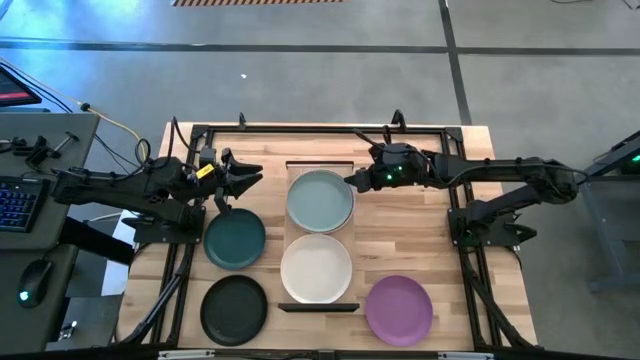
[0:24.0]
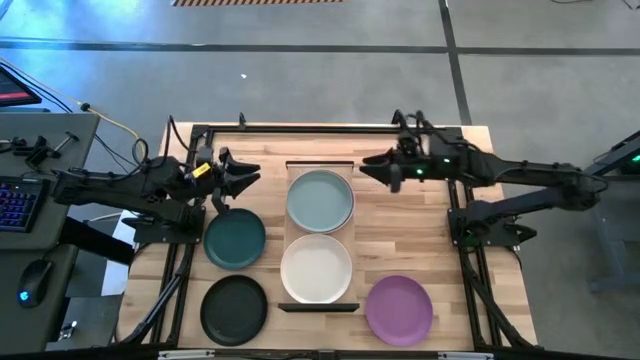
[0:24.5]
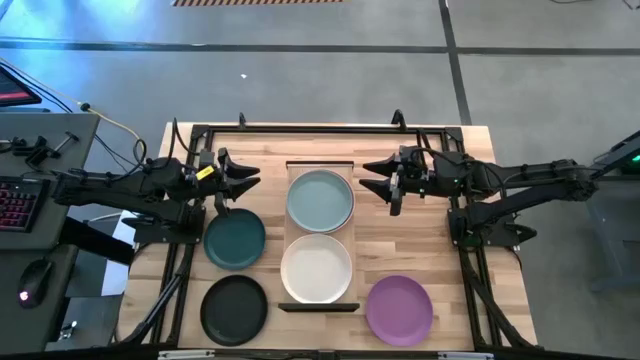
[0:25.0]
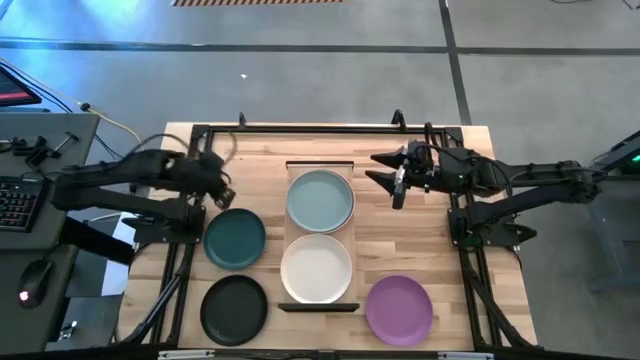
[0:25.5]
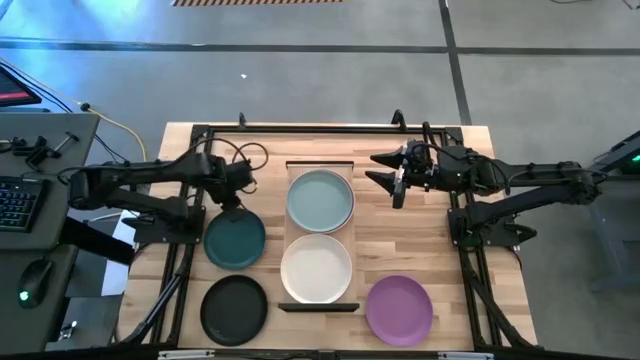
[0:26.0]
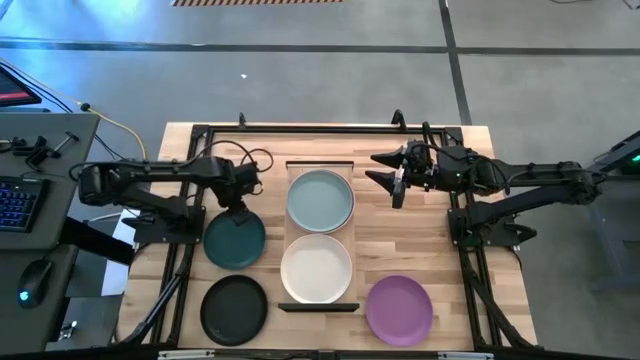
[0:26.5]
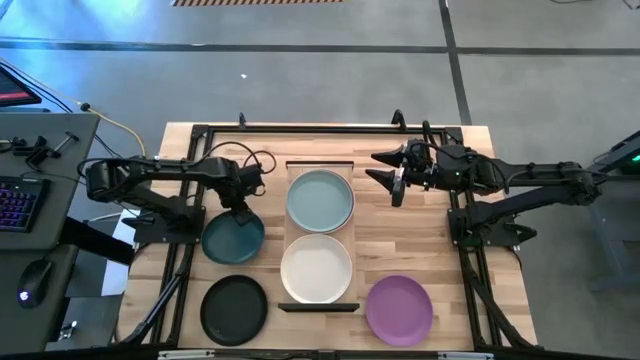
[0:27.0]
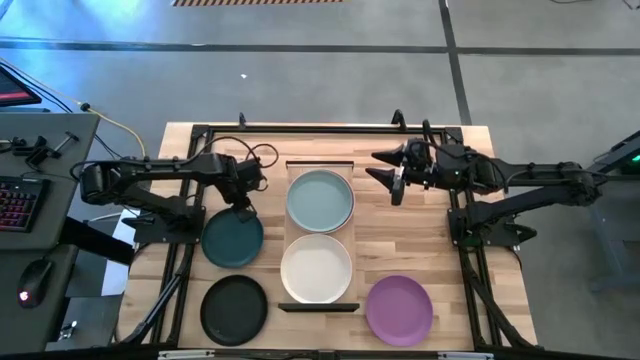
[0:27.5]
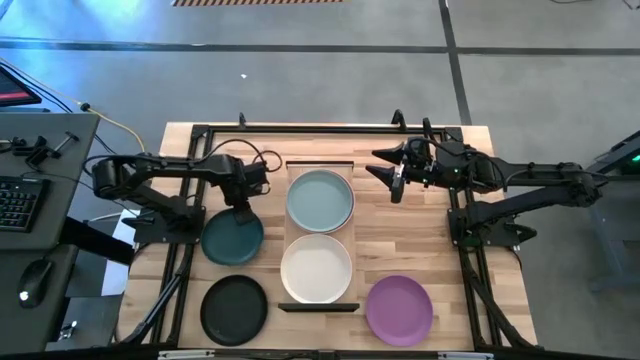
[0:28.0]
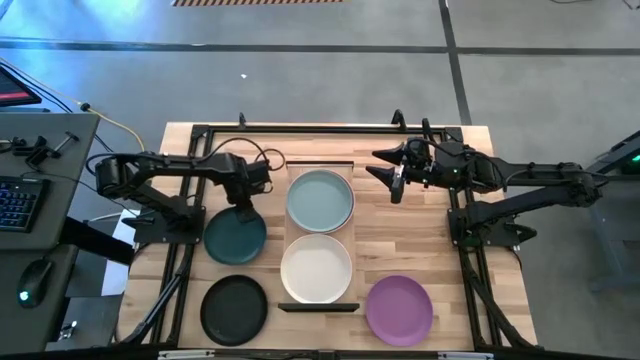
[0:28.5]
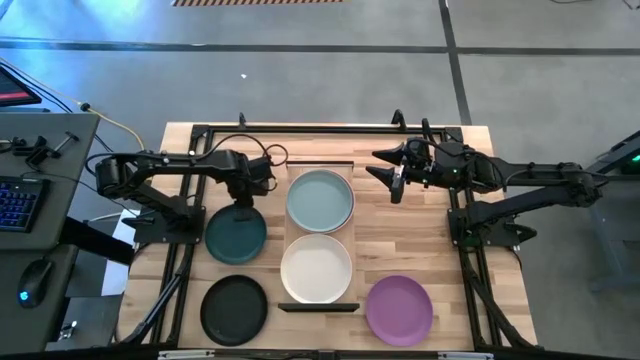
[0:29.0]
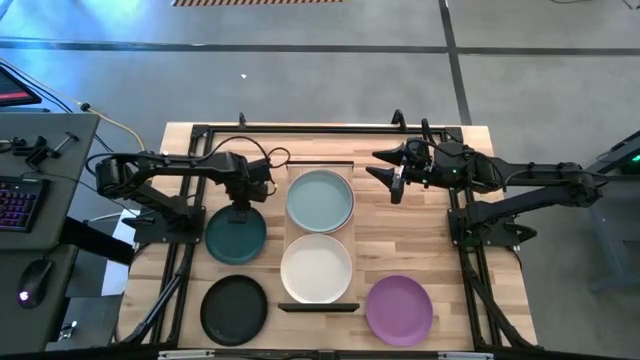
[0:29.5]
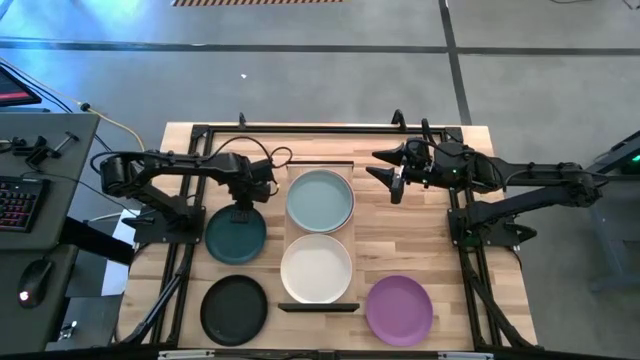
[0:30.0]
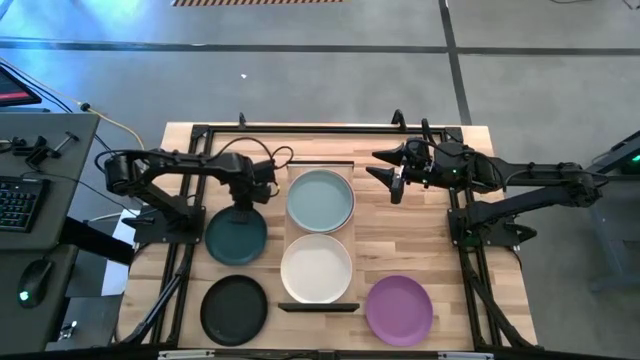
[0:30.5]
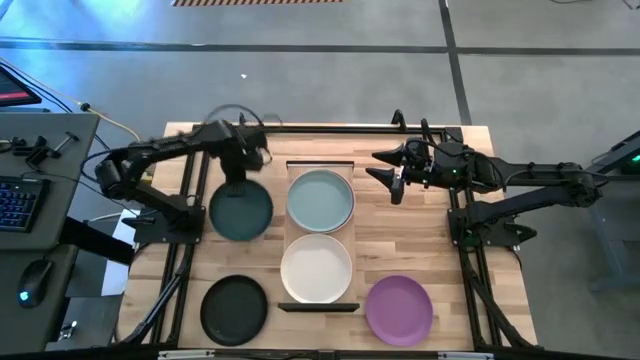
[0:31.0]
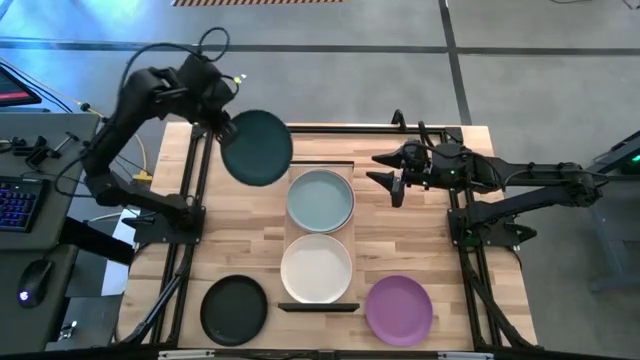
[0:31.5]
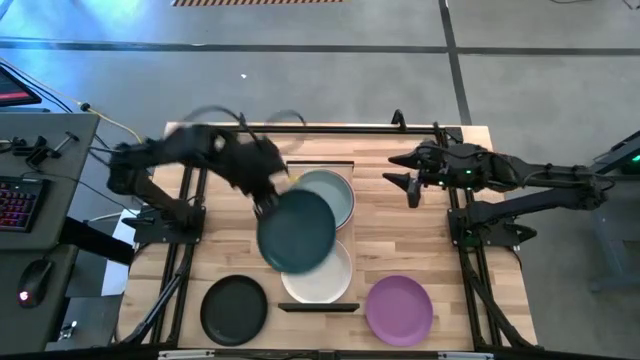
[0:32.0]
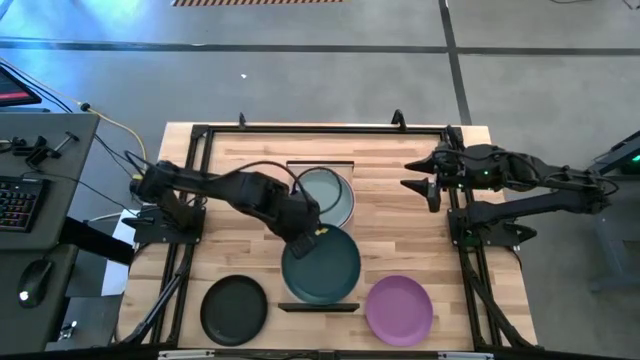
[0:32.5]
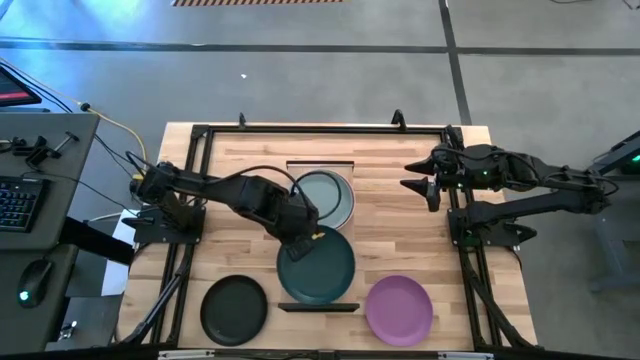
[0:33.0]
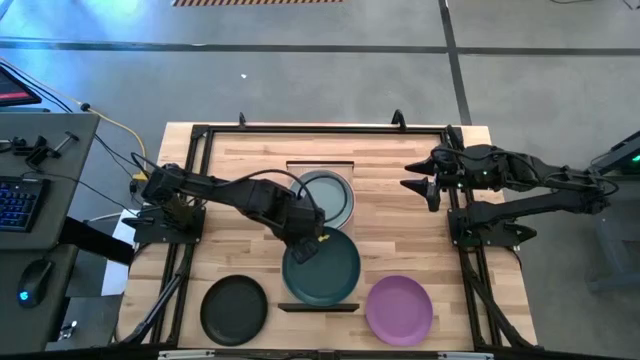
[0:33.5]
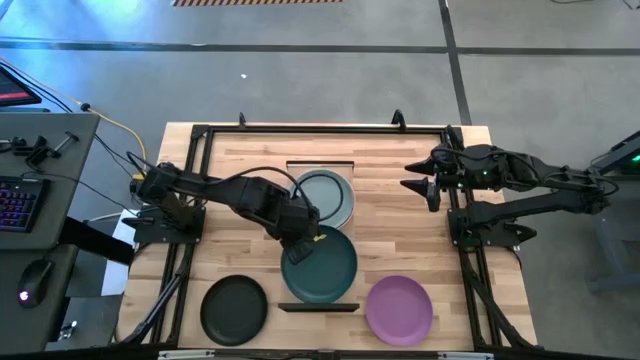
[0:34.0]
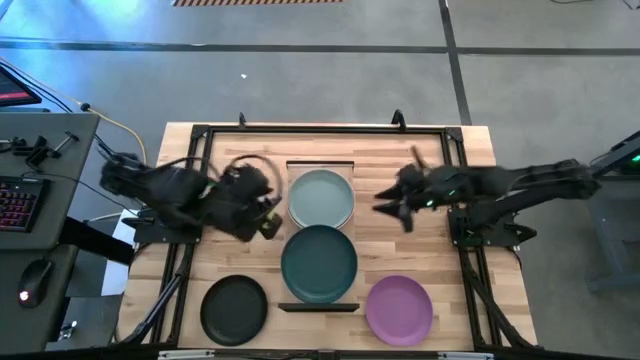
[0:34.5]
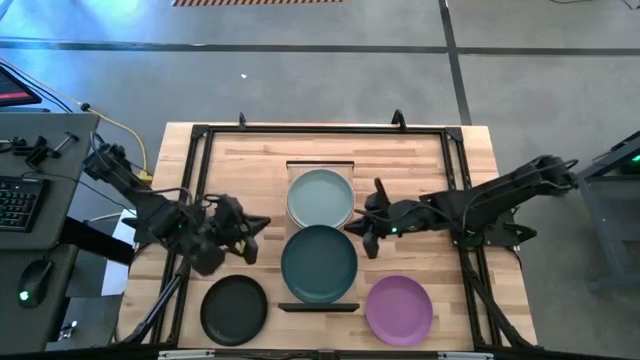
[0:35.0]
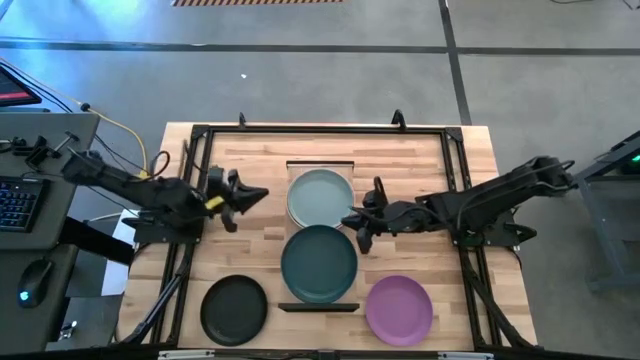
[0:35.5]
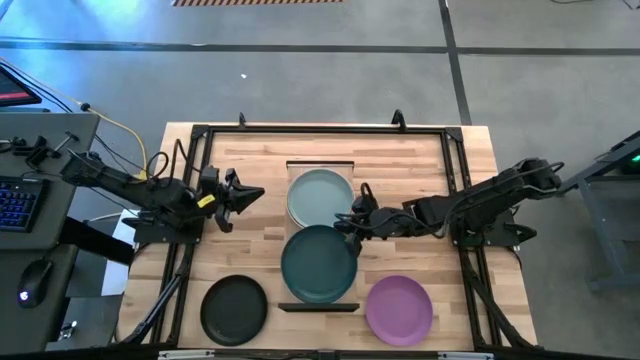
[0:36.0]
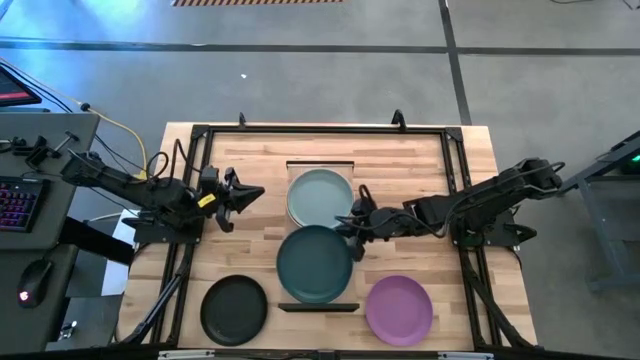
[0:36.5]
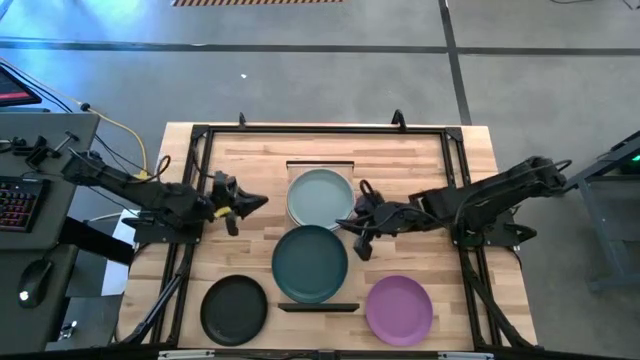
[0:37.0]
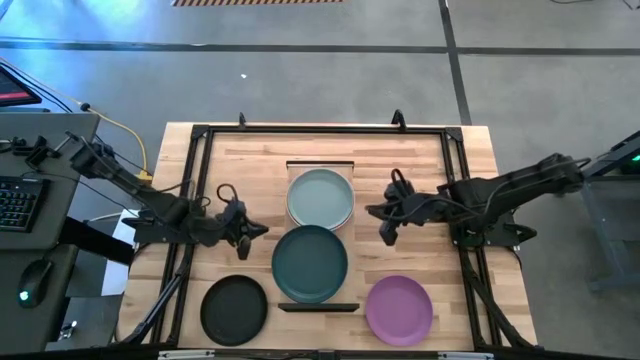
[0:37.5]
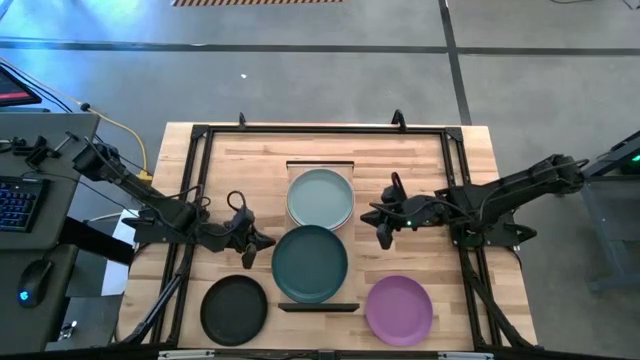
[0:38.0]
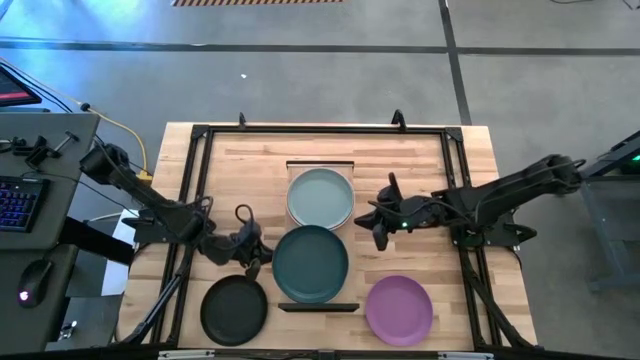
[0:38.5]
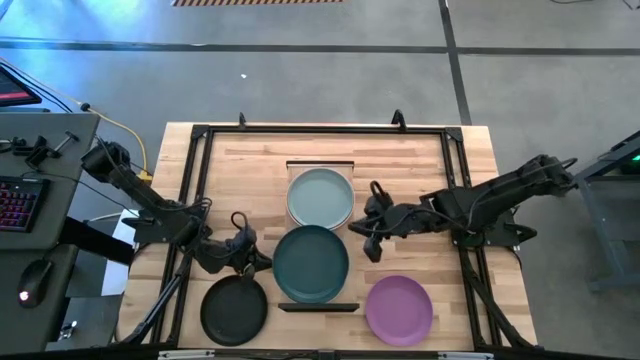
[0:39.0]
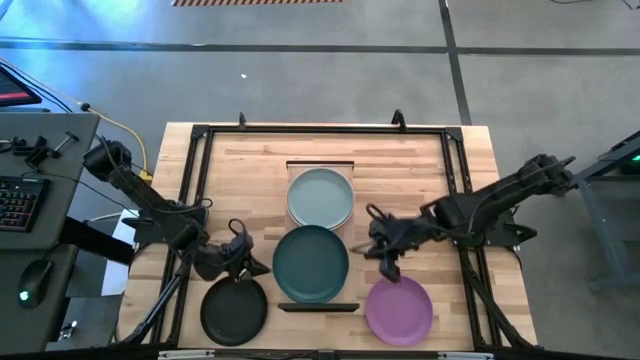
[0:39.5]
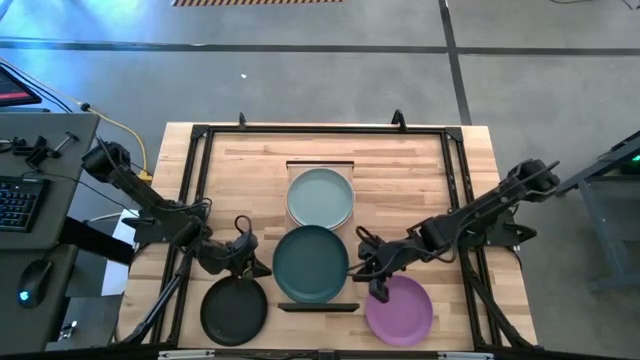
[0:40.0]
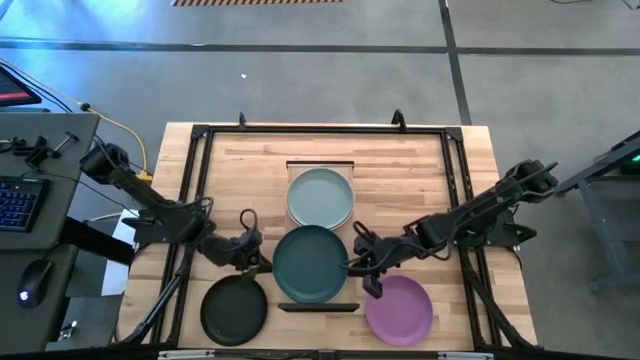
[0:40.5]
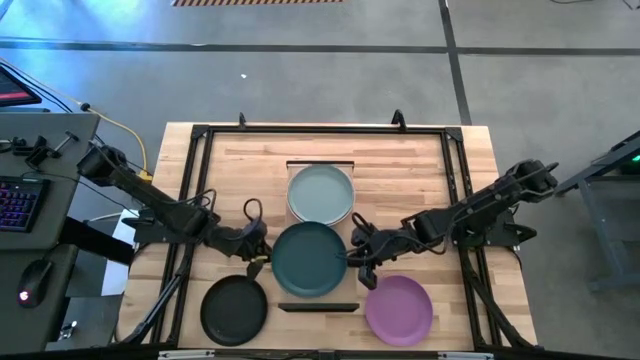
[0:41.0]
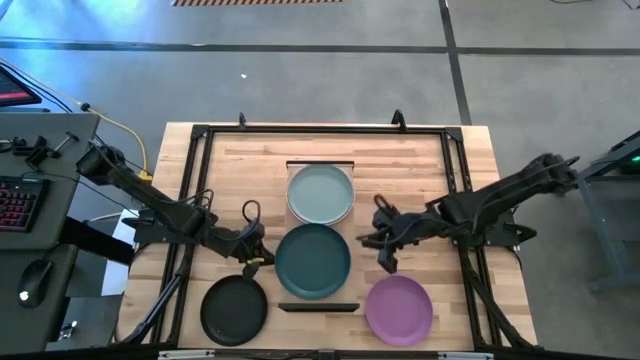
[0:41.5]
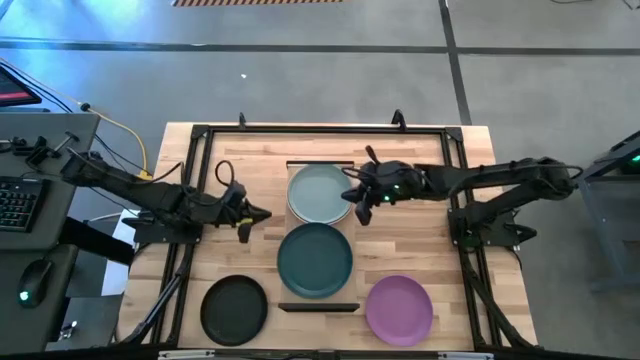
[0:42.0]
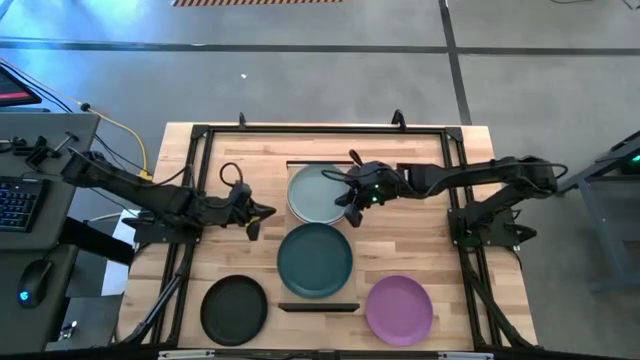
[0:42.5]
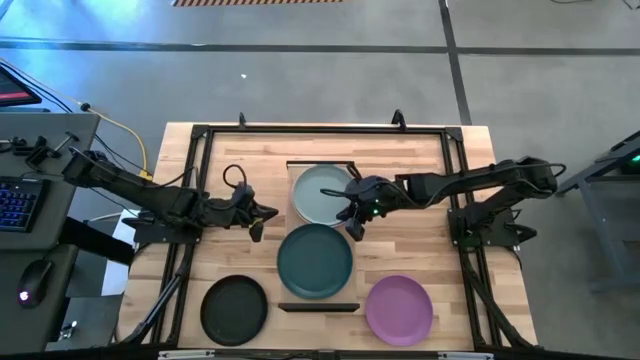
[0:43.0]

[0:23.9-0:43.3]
Task: Place and stack plates onto a shelf
Stack the dark blue plate on top of the white plate on the shelf

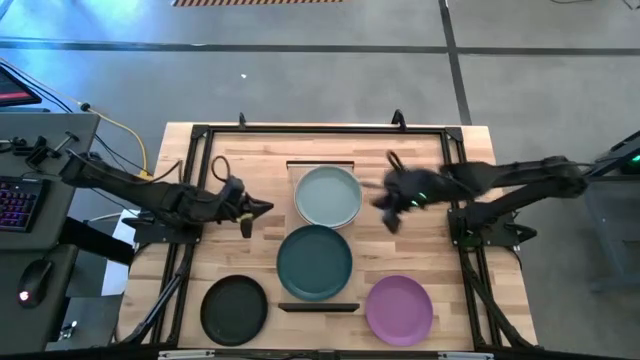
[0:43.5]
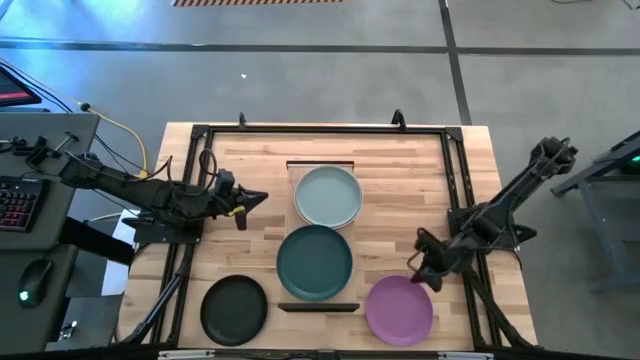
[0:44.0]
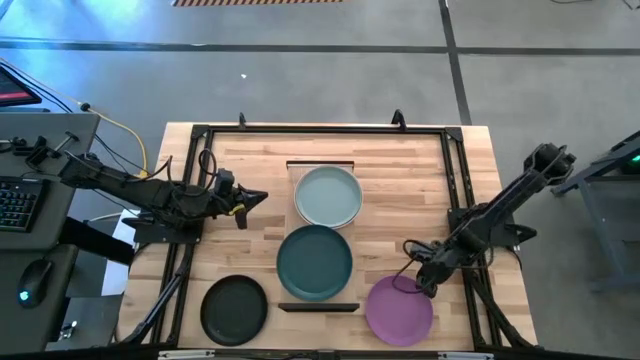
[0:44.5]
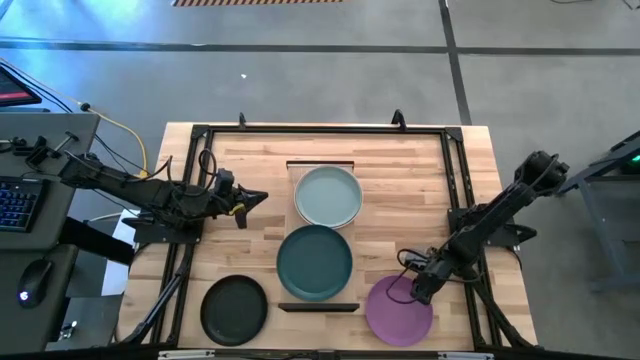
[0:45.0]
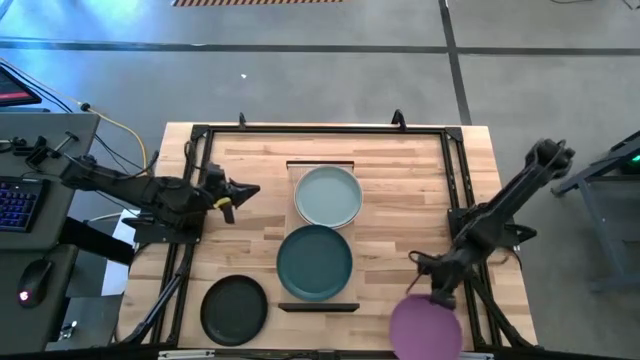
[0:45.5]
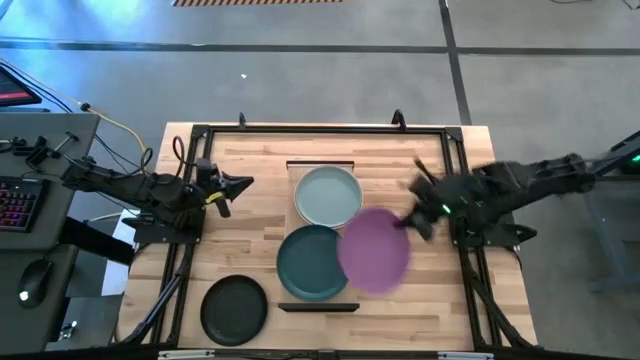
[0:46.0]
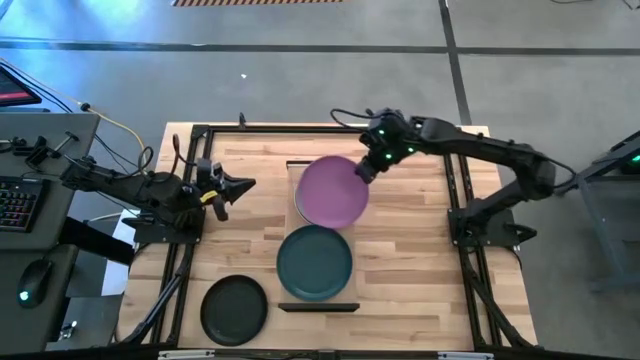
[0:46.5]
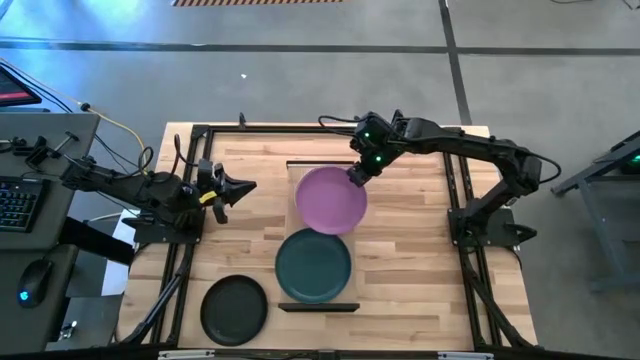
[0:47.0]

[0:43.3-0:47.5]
Stack the purple plate on top of the light blue plate on the shelf
